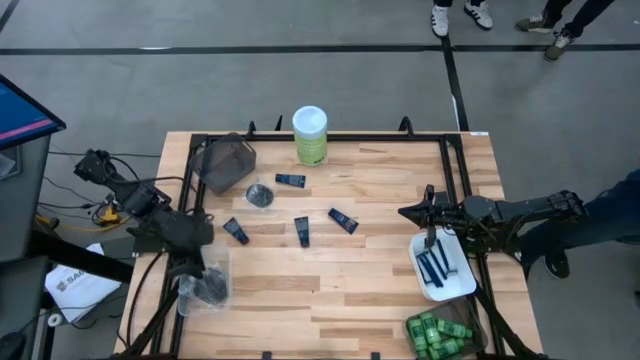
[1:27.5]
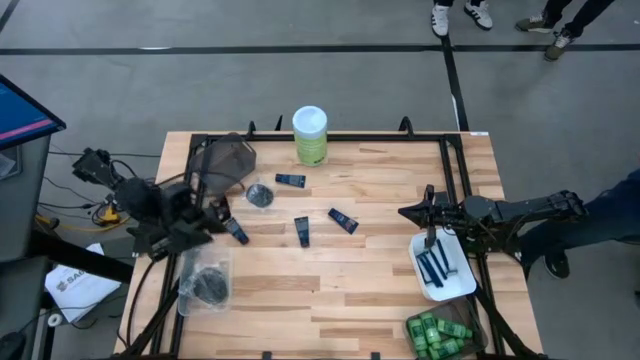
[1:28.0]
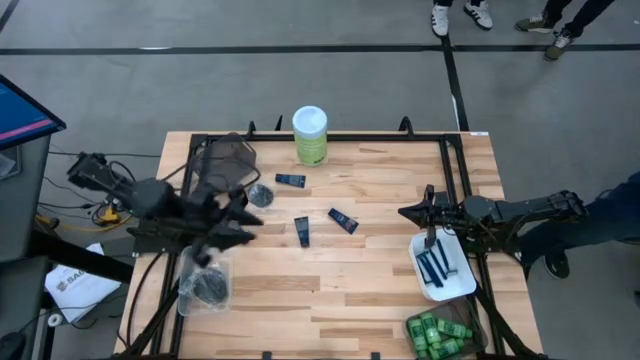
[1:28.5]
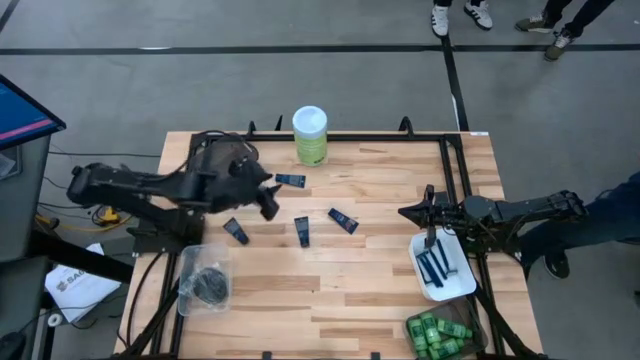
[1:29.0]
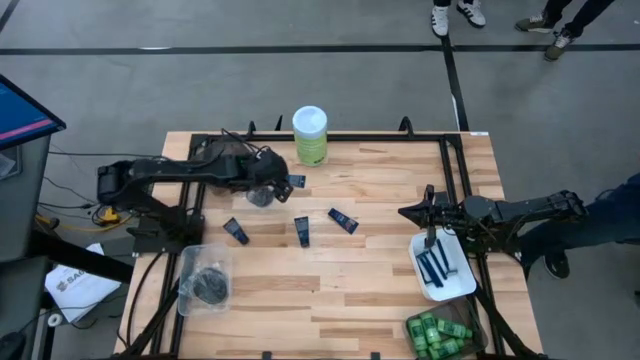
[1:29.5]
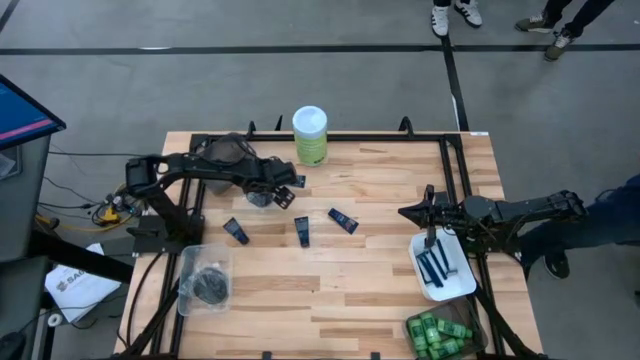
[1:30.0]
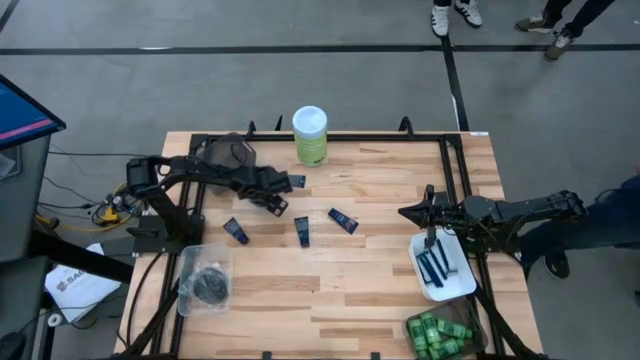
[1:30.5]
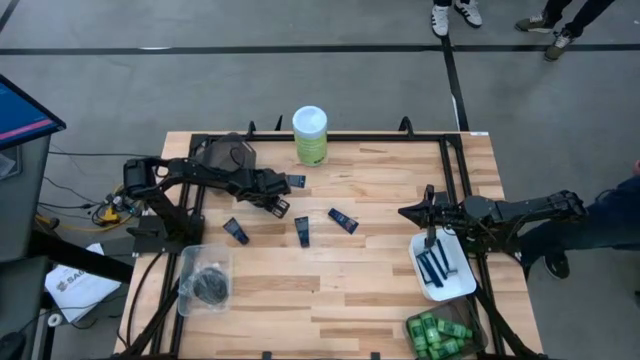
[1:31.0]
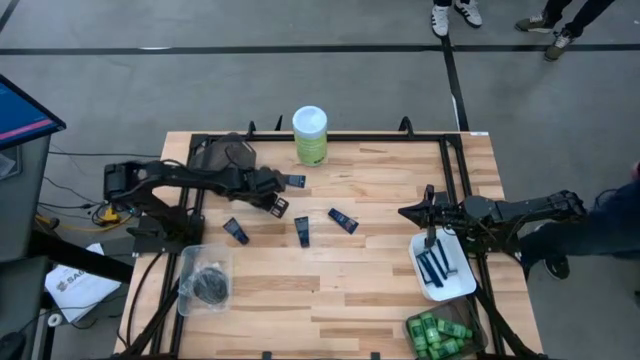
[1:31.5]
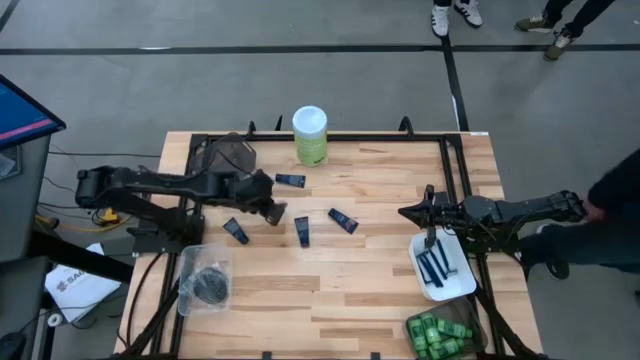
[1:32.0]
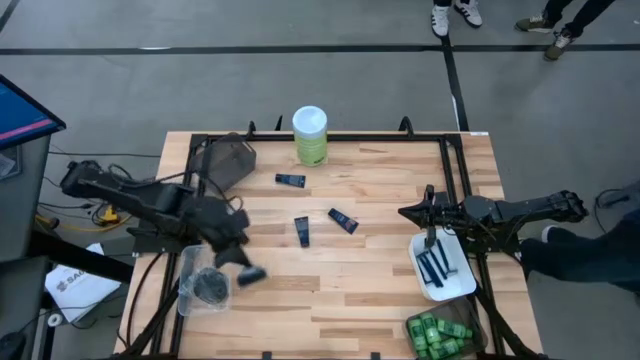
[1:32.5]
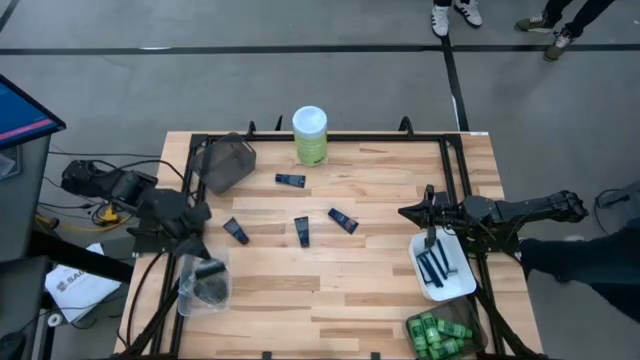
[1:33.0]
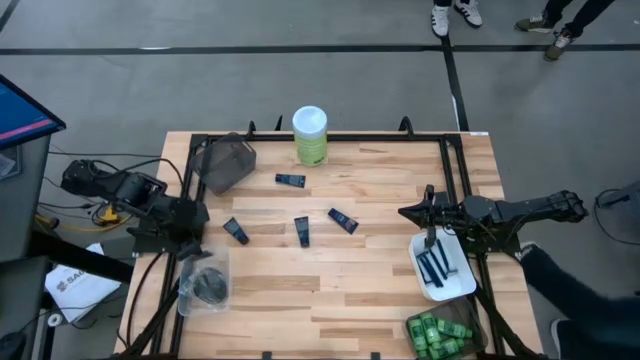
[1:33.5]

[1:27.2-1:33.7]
Task: Pick & Place Travel size toiletries
Put the black hairbrush into the transparent bin

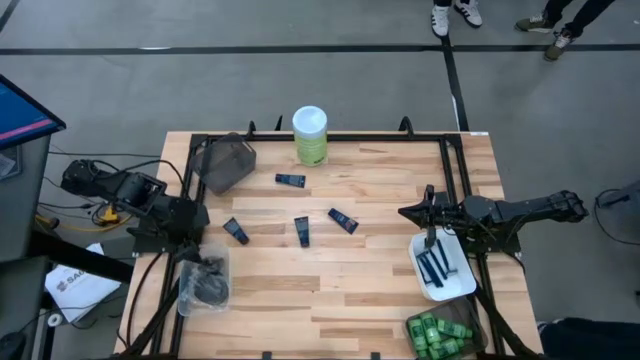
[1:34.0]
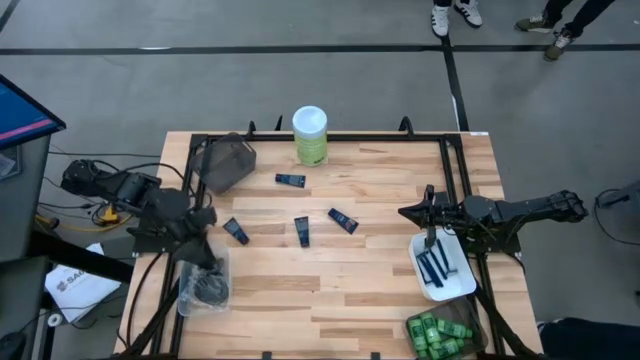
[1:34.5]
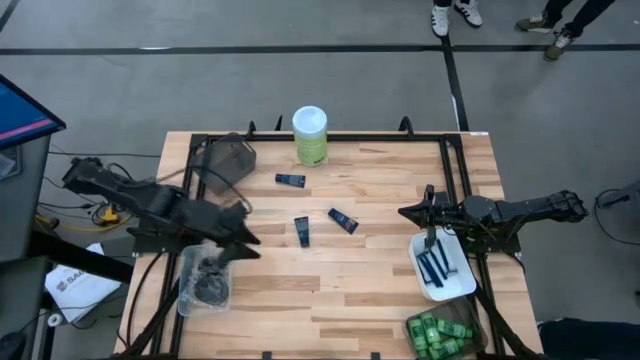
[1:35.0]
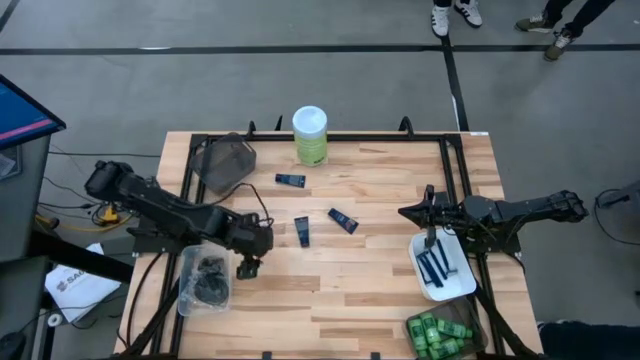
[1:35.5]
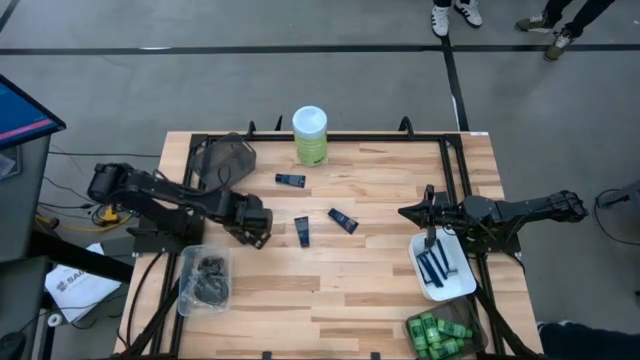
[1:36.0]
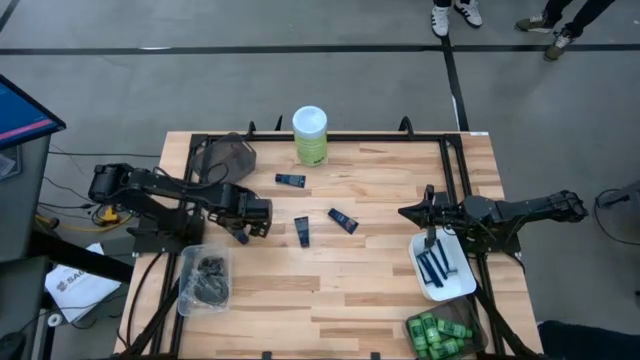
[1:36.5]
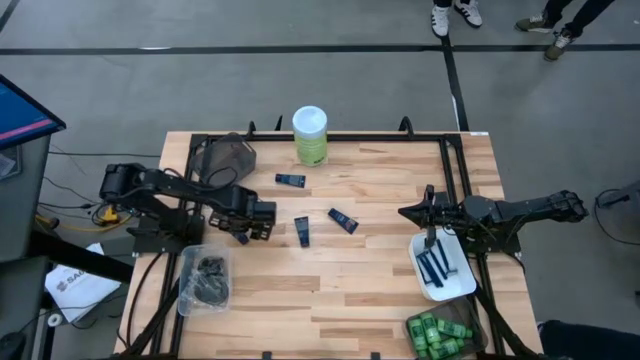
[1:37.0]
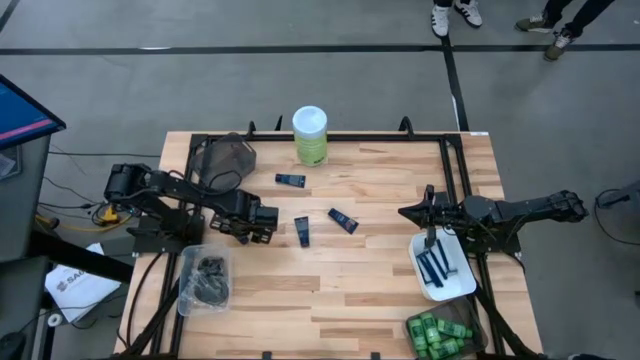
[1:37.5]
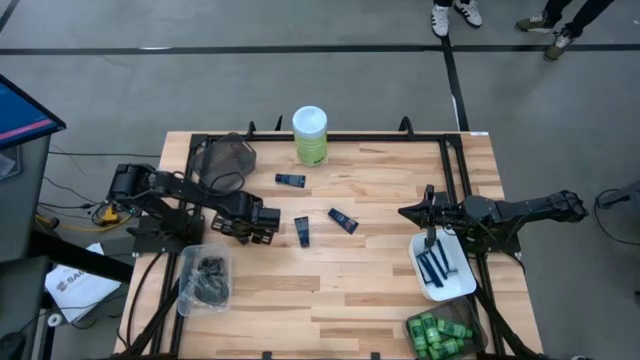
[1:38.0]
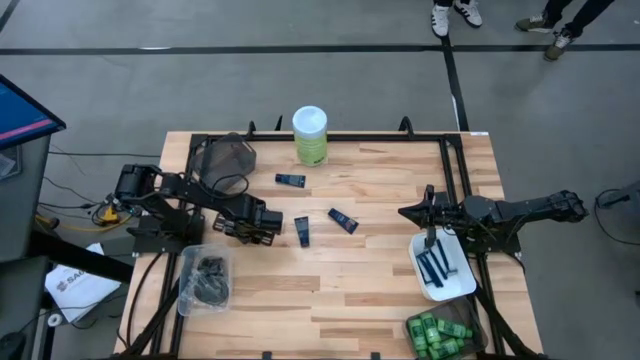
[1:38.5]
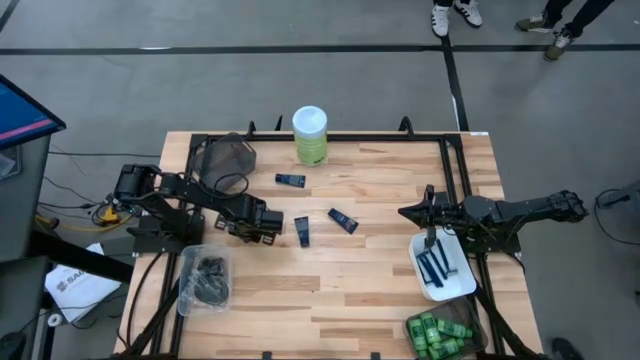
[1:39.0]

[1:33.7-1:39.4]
Put the black shave cream into the top black bin

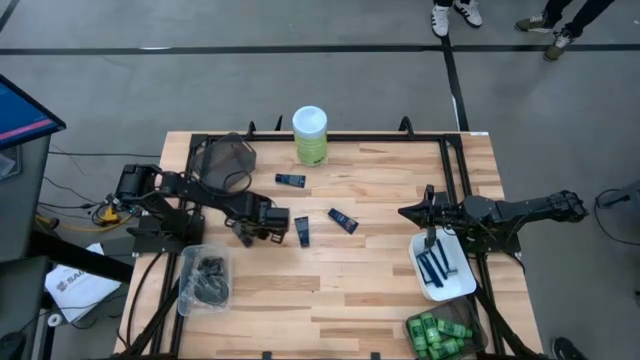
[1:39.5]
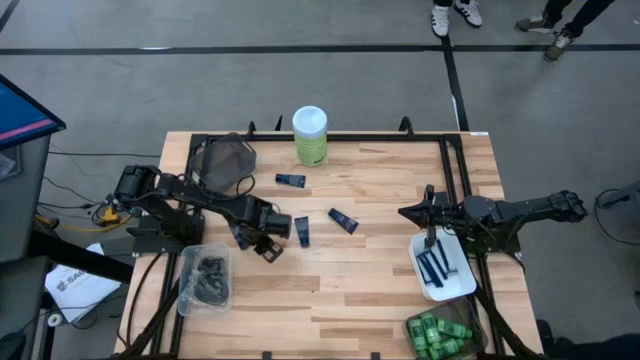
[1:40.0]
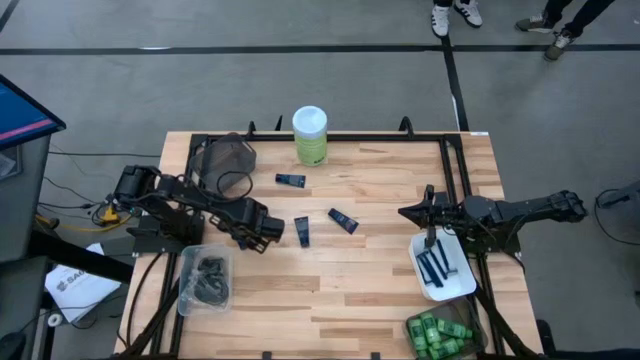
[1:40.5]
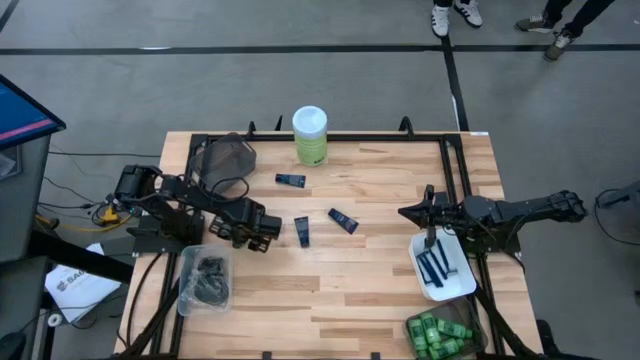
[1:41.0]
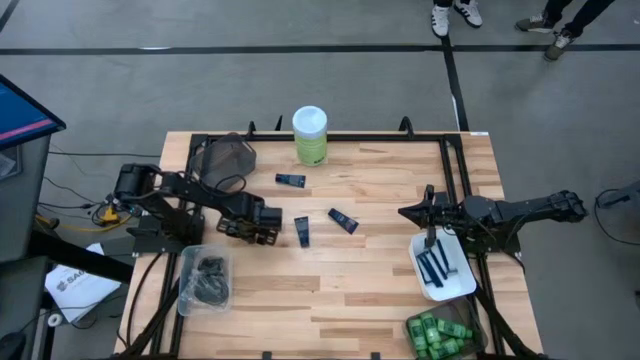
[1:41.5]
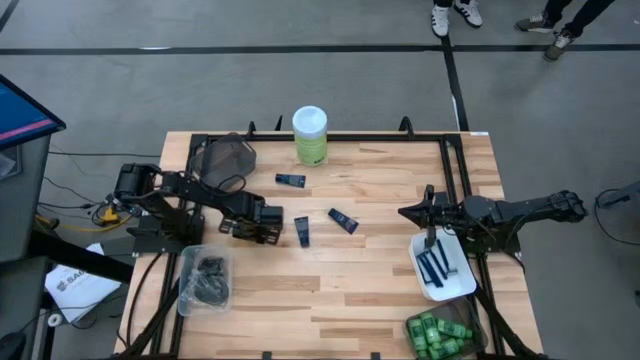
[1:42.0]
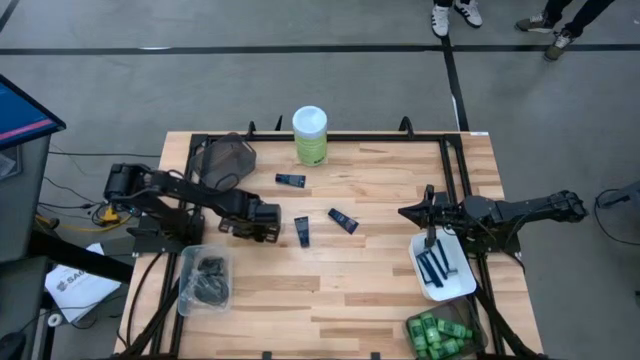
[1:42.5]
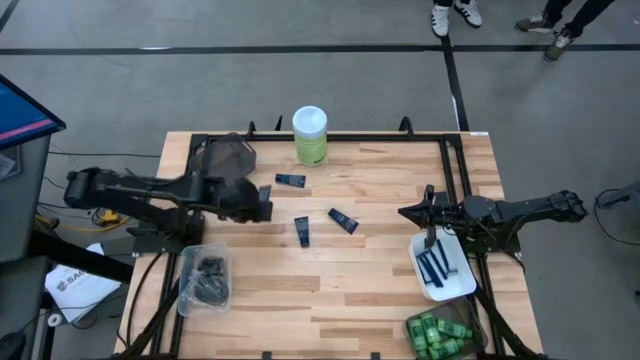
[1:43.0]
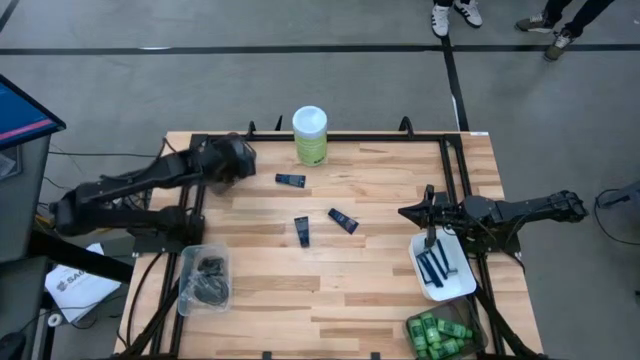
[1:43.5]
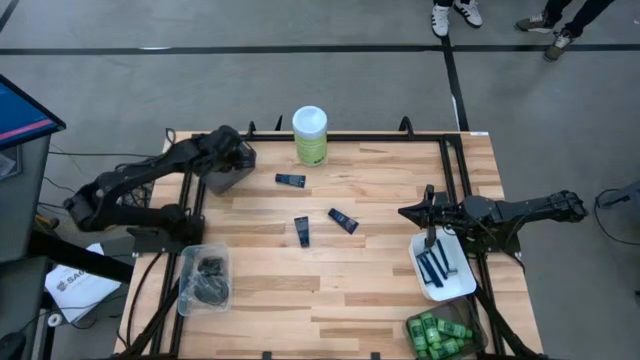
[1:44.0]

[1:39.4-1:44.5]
Put the black shave cream into the top black bin

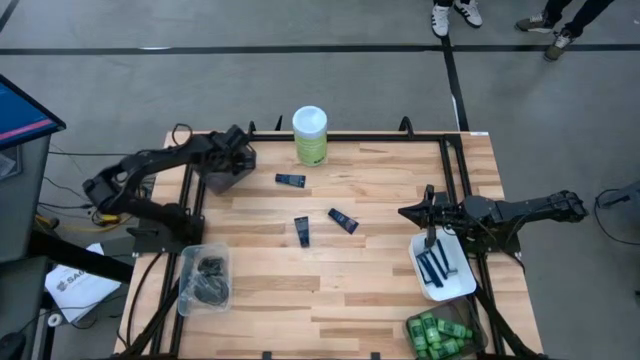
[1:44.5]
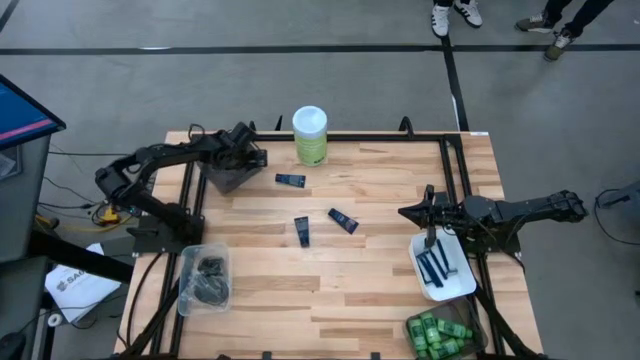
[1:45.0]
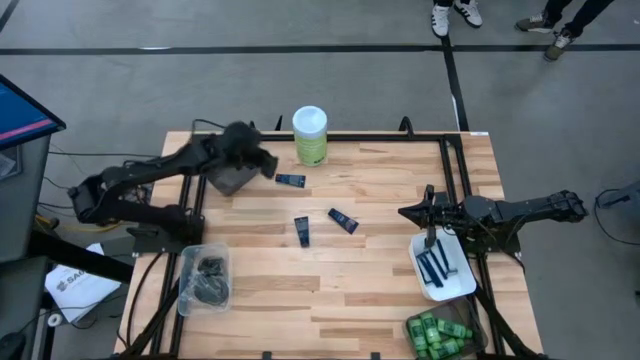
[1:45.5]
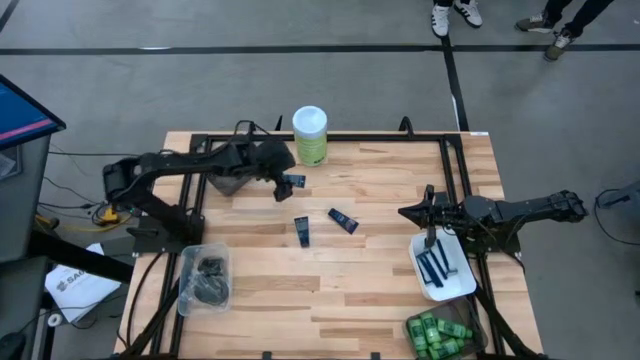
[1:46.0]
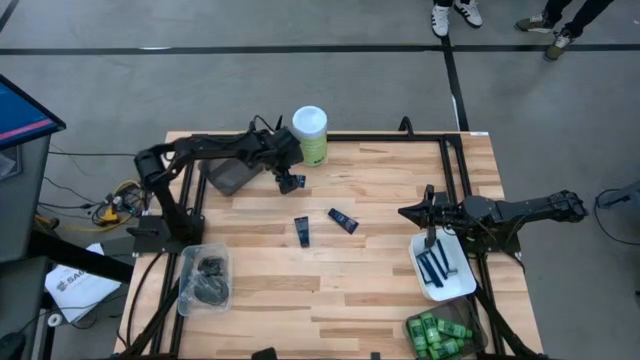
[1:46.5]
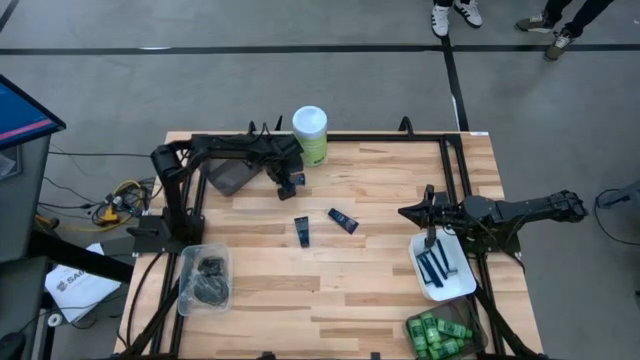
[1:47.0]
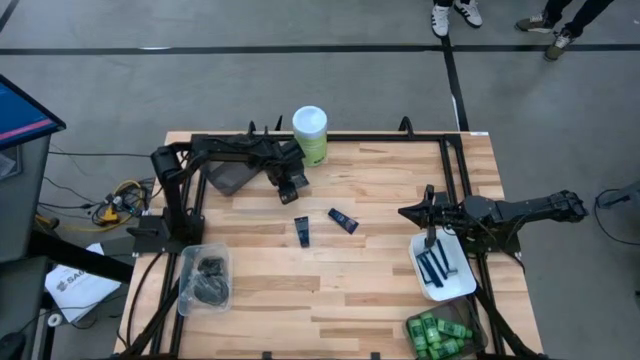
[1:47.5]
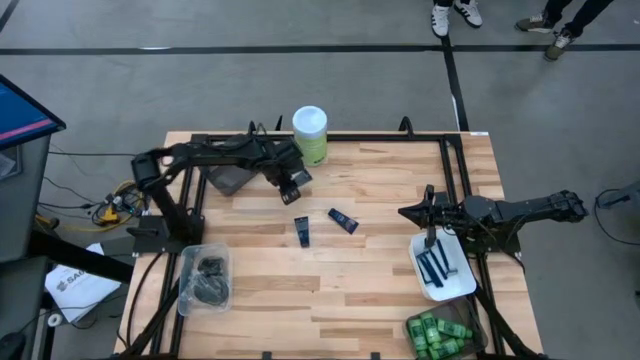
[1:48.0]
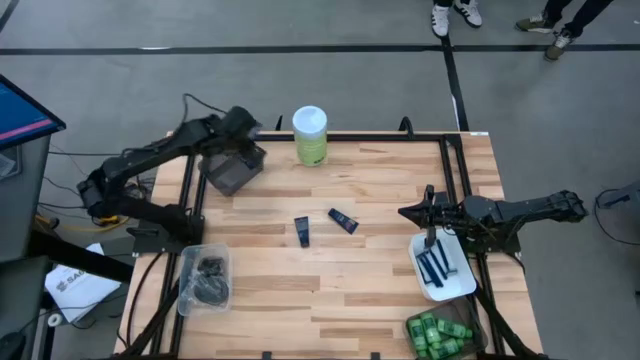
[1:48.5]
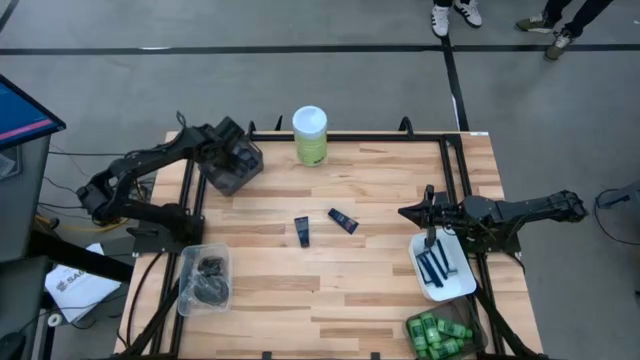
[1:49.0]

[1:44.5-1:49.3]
Put the black shave cream into the top black bin
